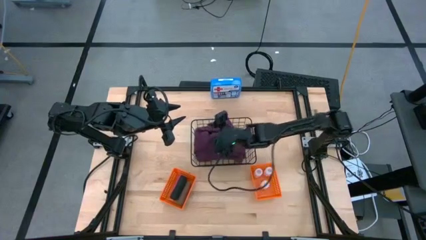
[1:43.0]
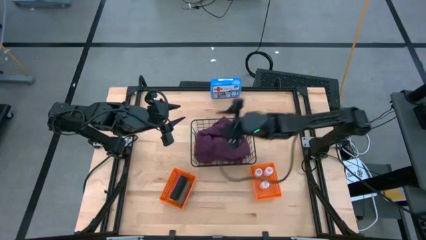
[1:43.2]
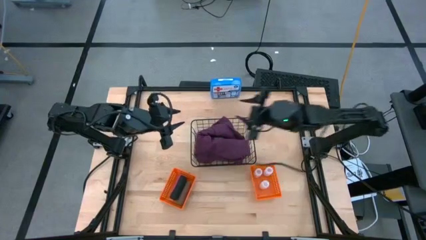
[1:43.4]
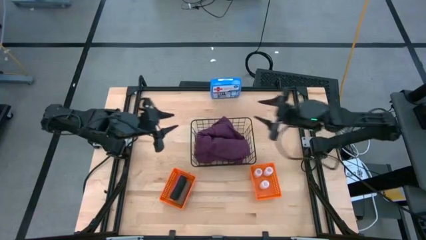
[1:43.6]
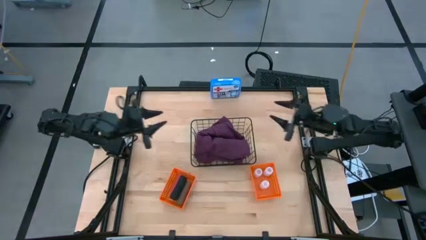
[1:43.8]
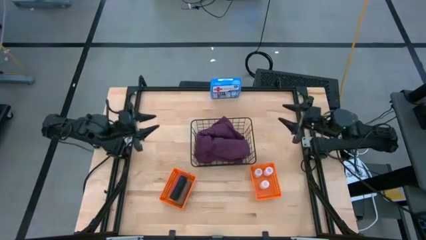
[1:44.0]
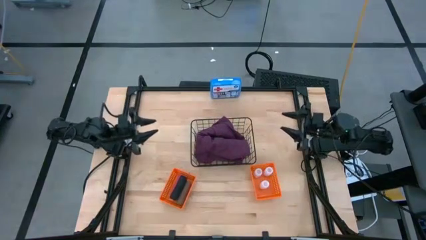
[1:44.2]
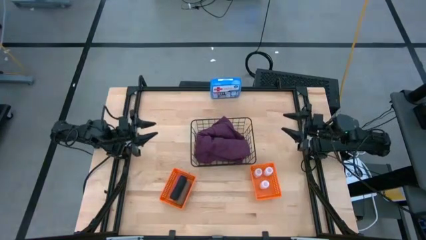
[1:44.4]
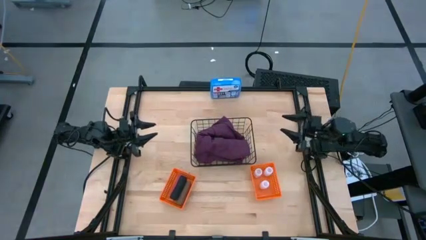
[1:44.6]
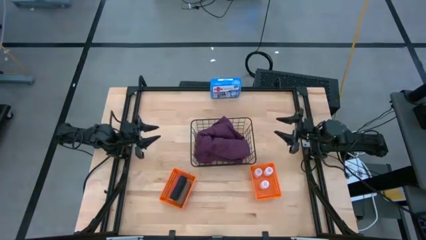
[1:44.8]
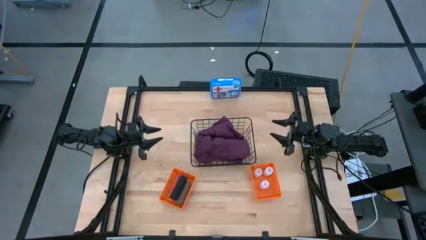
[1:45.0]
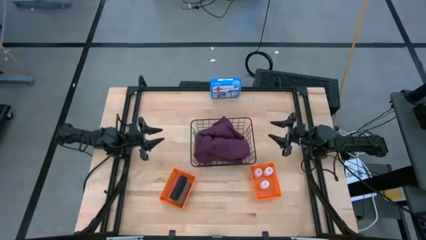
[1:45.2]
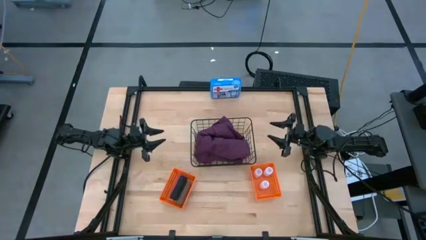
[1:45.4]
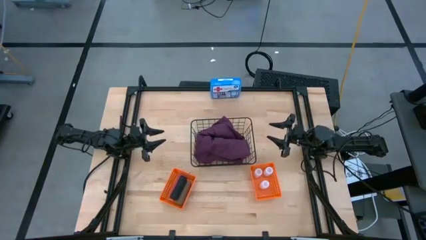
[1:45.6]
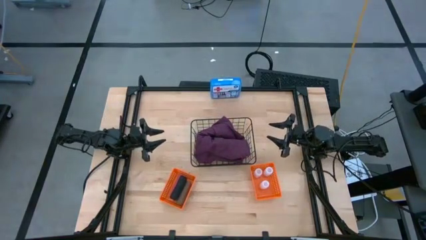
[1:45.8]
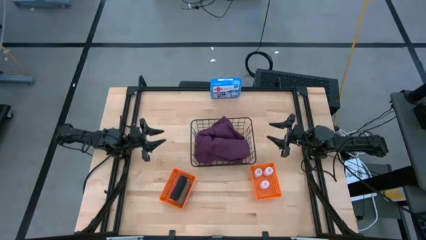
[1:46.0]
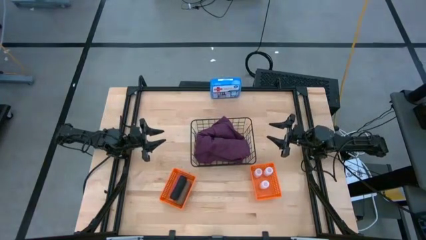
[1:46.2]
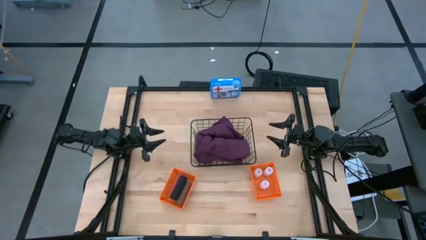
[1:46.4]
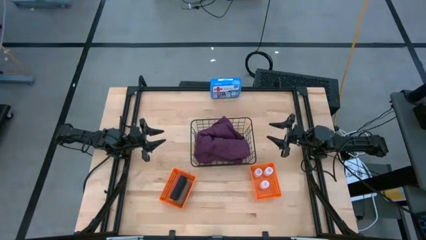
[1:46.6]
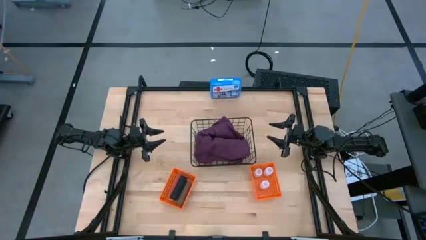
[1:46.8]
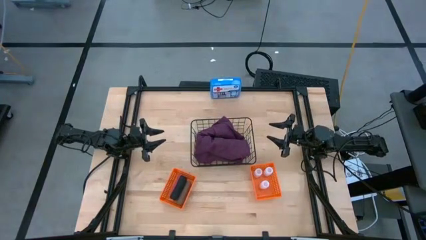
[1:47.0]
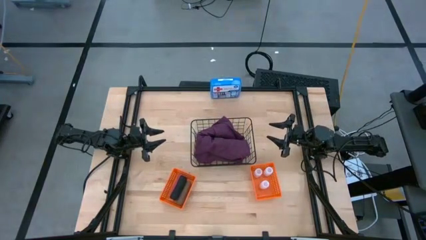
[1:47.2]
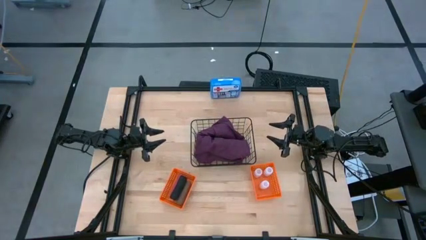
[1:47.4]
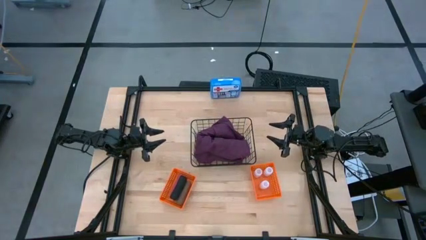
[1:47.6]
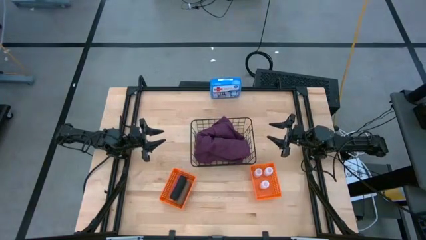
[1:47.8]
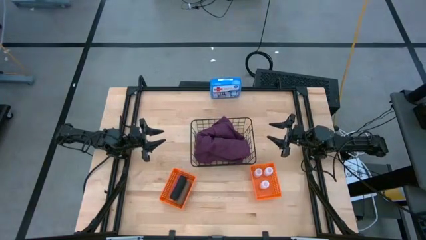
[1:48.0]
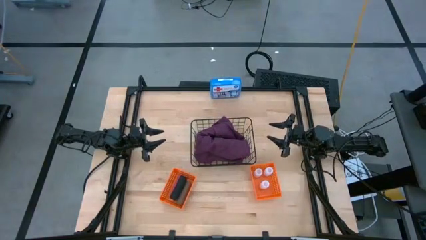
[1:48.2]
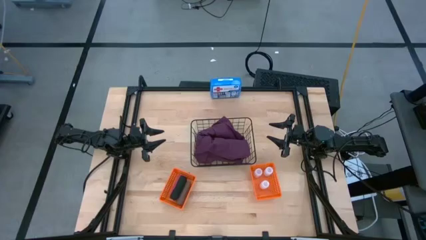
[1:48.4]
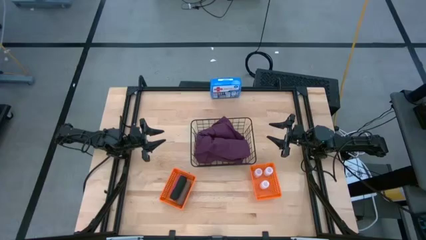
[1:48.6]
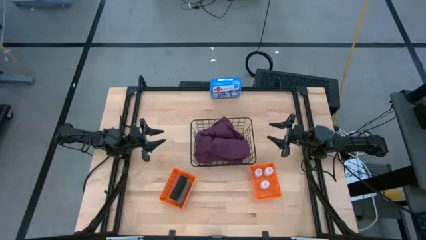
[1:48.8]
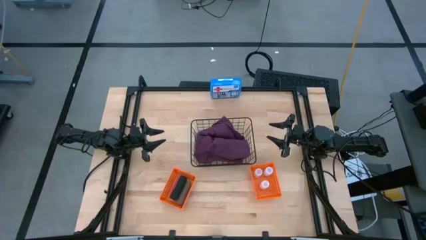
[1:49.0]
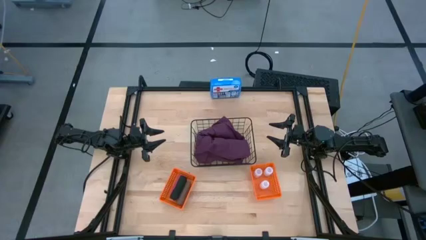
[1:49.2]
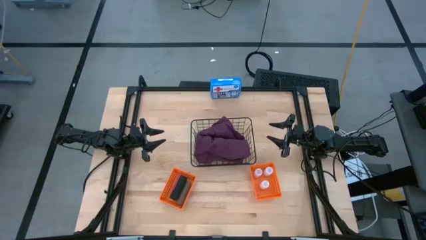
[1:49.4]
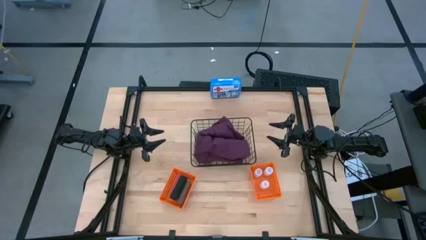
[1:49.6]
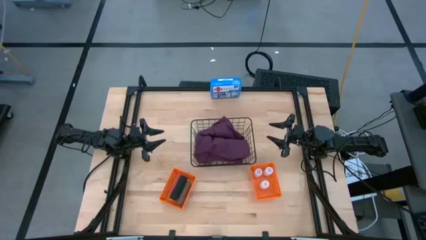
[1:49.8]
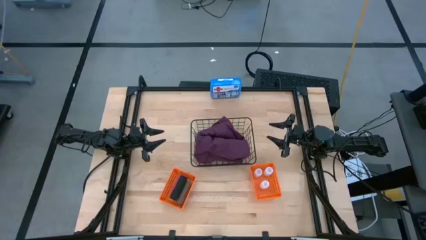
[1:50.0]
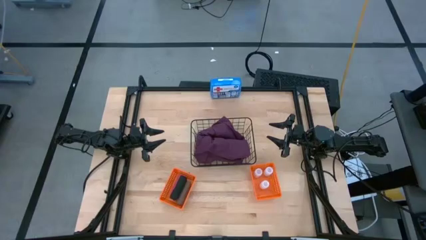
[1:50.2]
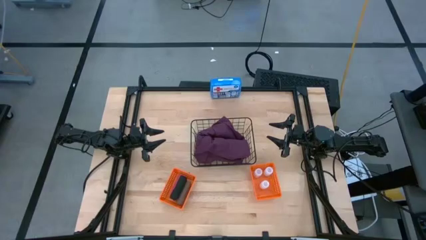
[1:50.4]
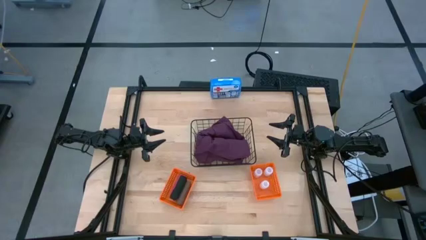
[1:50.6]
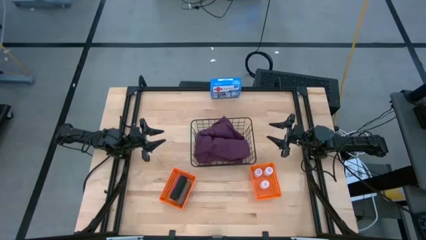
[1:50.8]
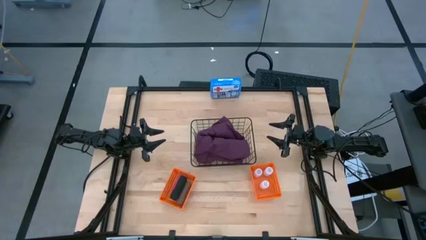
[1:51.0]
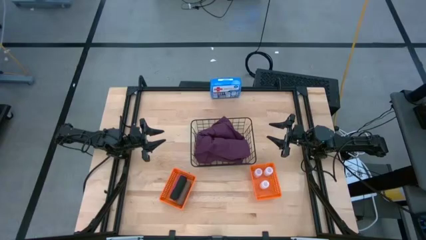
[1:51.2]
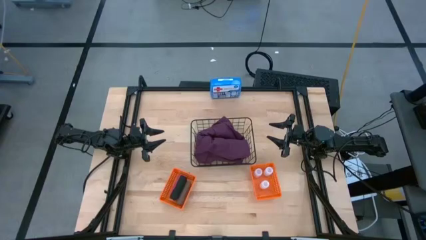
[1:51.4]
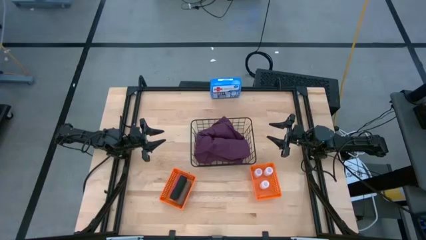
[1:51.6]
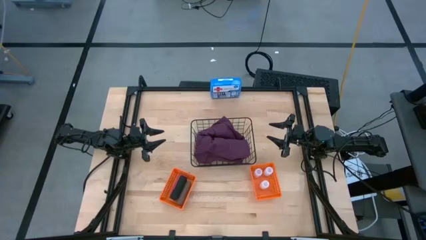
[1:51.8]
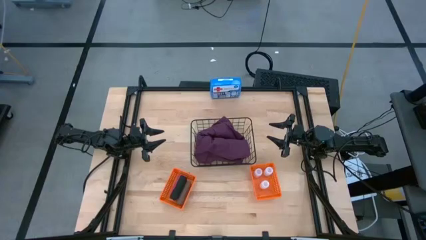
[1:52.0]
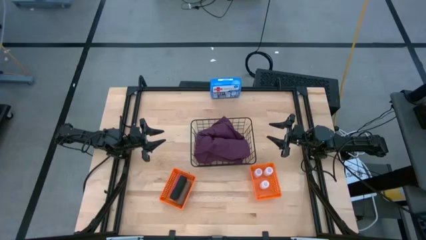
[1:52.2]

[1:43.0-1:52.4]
Task: Pick & Place Medicine items
Return to Home Position

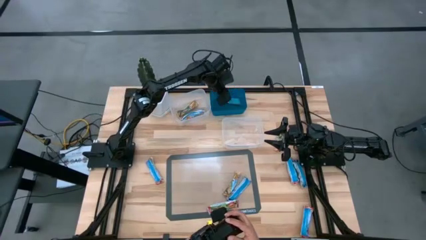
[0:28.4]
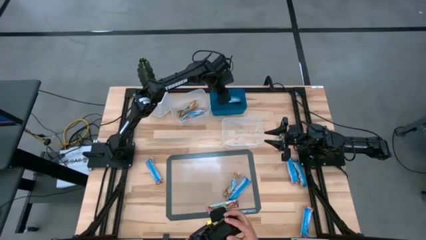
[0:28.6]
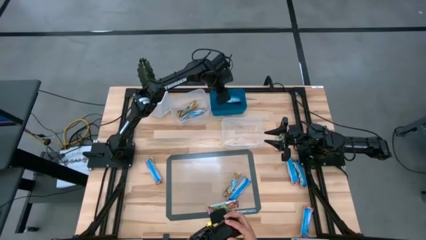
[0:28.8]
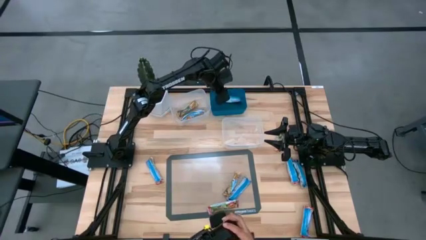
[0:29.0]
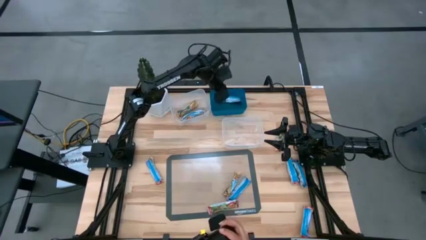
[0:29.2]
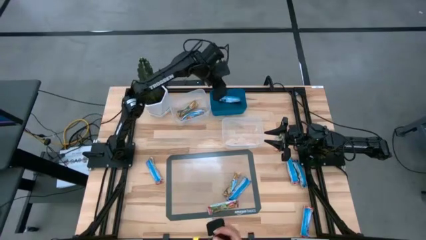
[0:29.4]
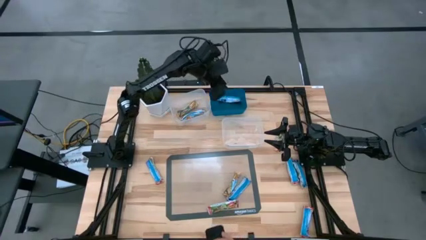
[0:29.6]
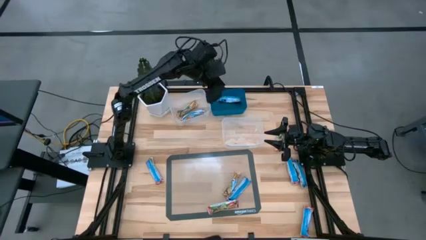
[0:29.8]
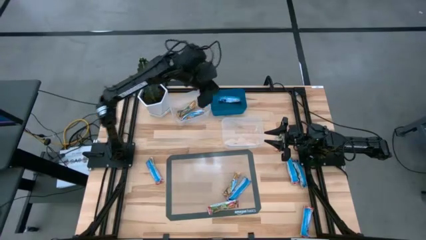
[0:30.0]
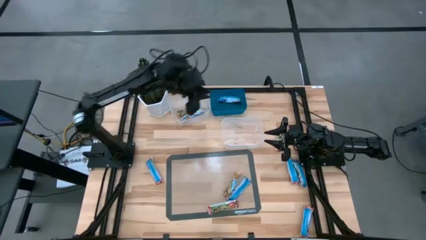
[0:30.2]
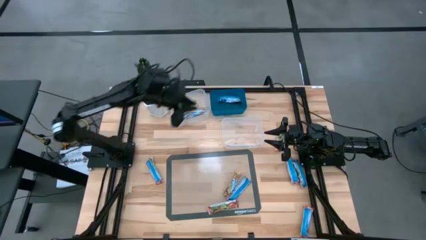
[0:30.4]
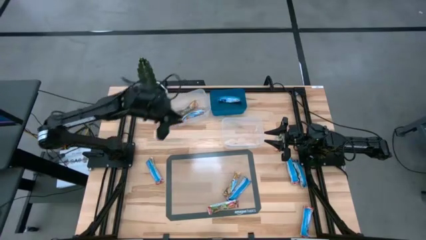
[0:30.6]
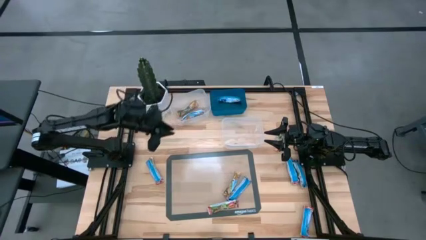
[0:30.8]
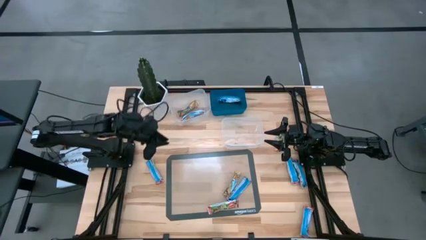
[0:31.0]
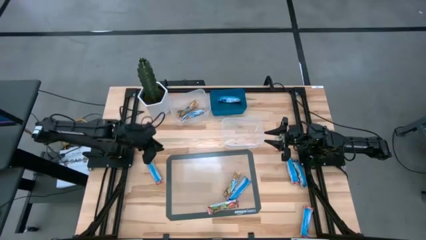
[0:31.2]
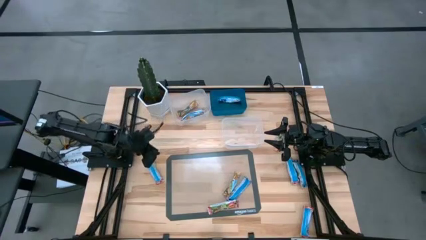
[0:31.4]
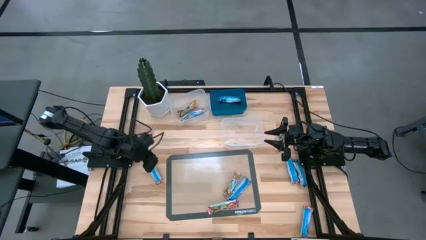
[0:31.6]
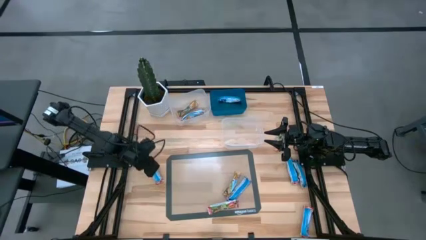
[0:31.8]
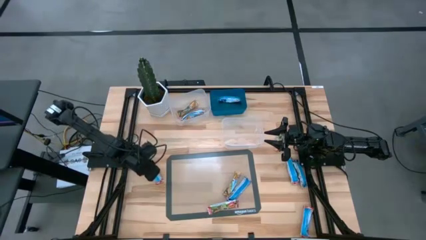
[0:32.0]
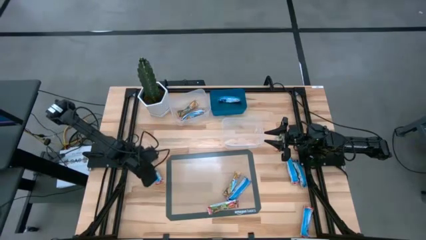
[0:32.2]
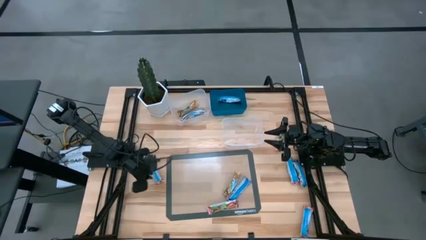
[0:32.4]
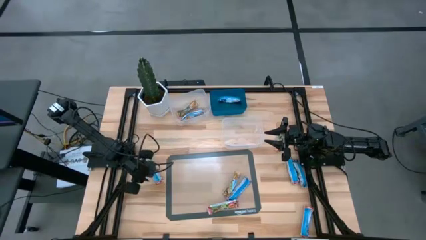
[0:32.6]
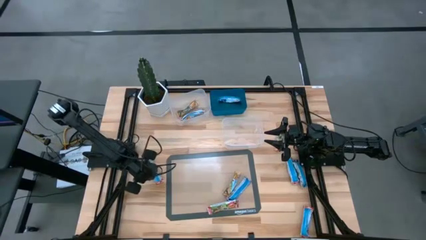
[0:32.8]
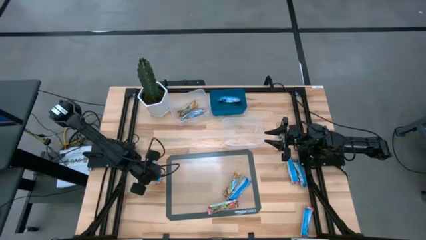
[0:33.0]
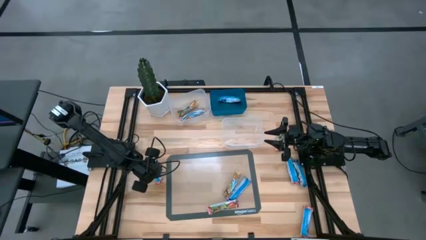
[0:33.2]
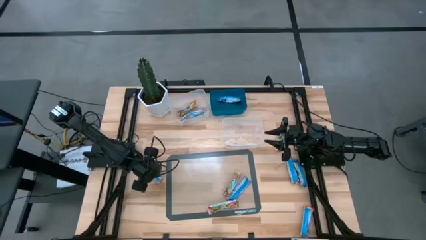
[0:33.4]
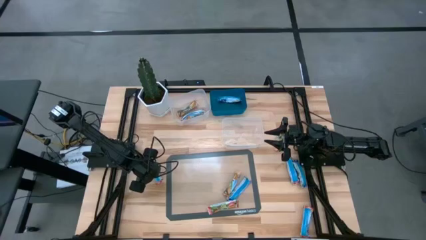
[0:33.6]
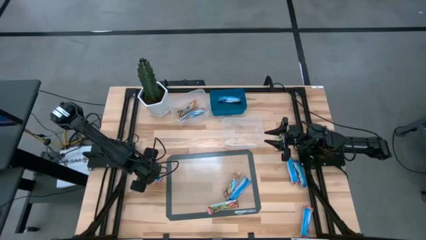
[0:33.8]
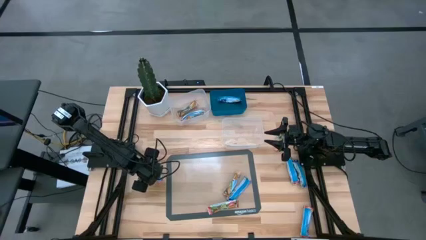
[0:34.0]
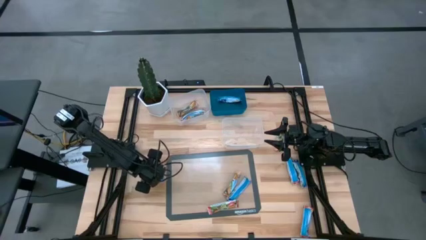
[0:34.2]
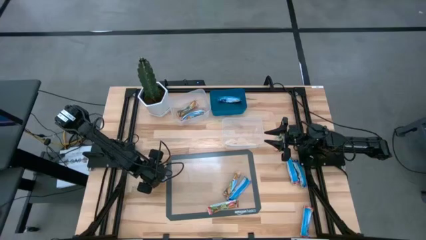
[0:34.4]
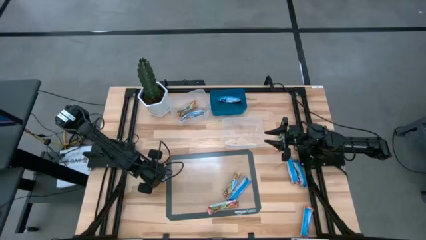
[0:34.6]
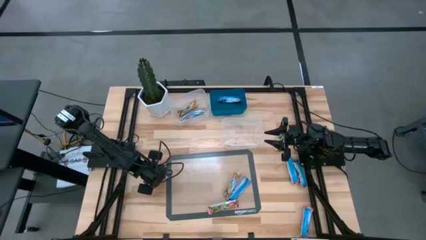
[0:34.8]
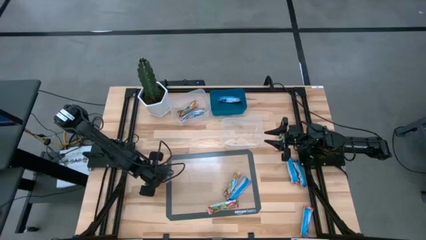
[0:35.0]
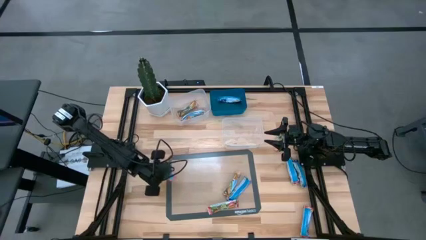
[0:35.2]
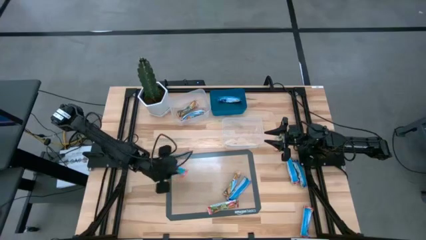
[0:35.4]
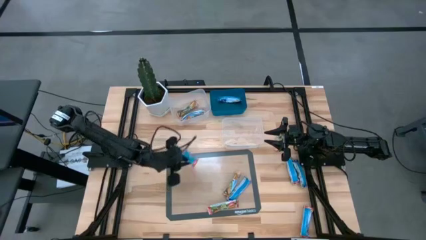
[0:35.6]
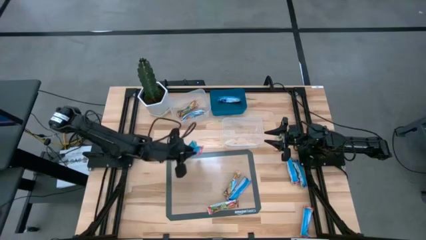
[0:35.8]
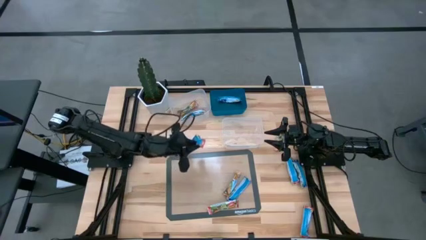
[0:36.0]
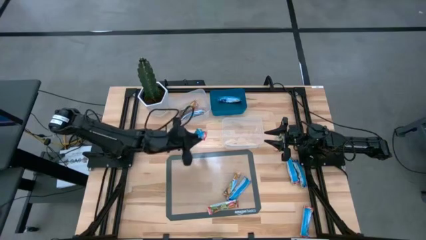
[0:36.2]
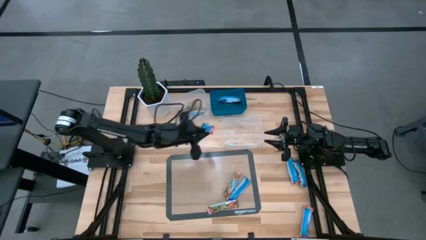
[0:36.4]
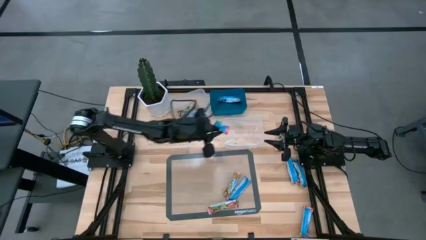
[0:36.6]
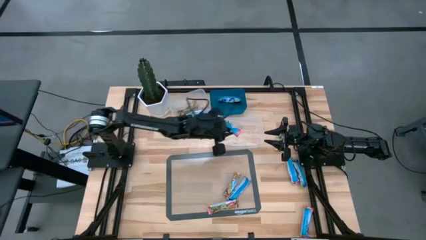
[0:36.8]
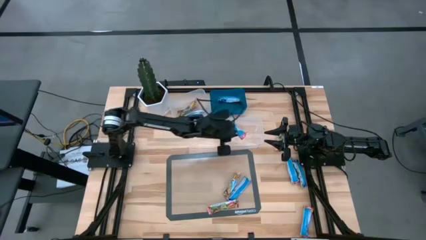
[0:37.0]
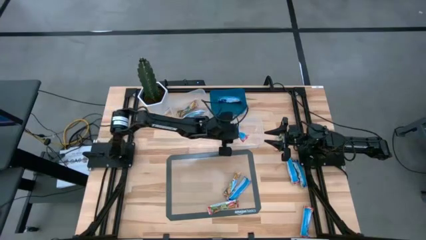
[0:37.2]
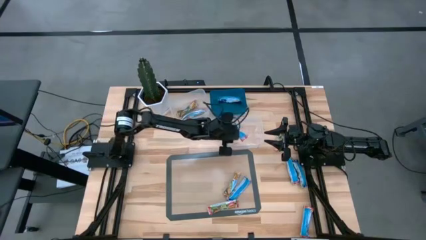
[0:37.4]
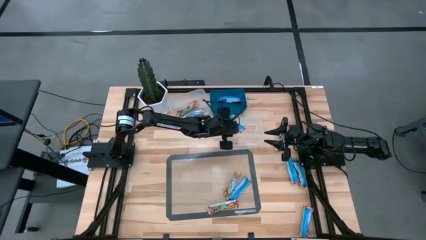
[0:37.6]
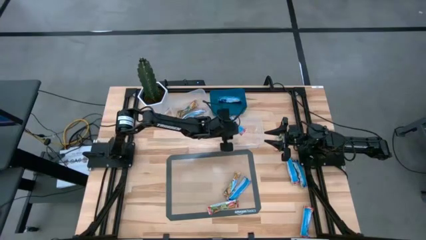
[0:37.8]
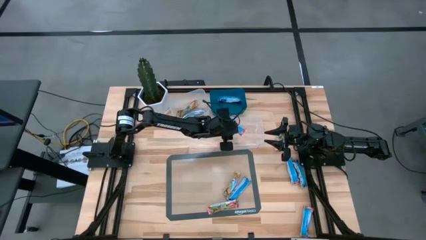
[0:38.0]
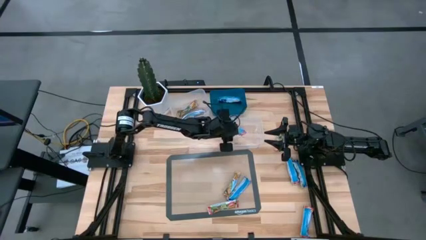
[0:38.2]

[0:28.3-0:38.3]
Task: Pick and place Granola Bars by type
Put the red granola bar into the bottom transparent bin
